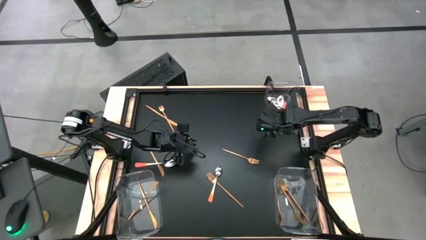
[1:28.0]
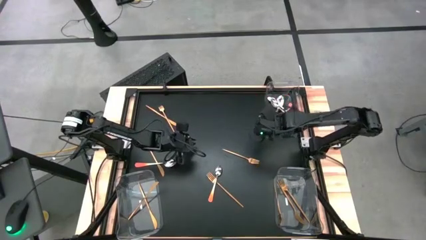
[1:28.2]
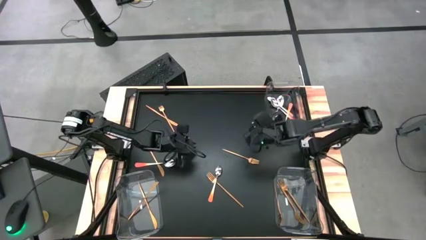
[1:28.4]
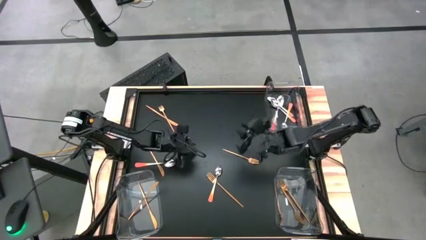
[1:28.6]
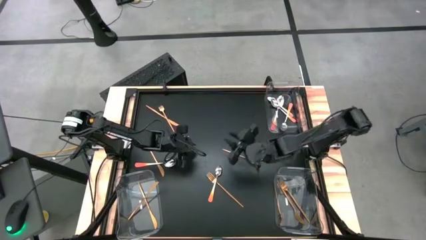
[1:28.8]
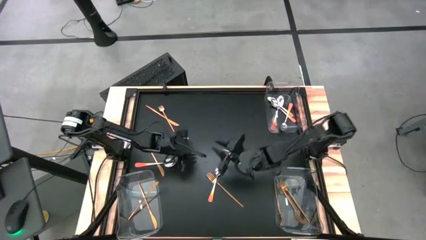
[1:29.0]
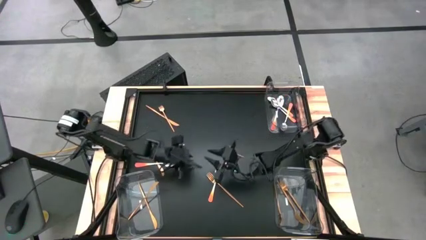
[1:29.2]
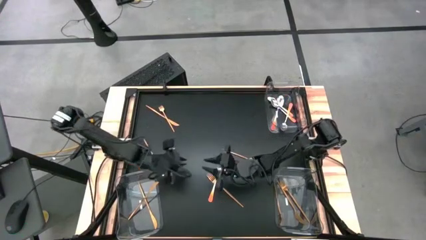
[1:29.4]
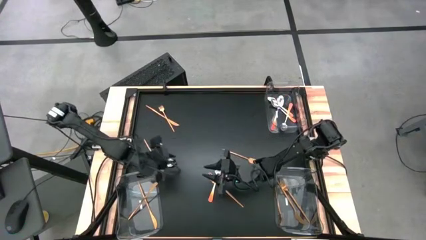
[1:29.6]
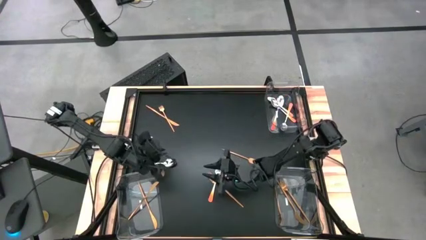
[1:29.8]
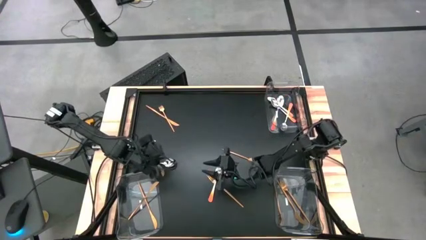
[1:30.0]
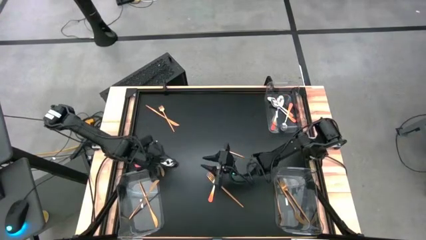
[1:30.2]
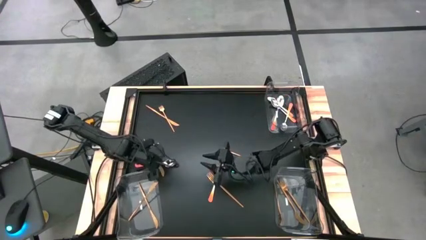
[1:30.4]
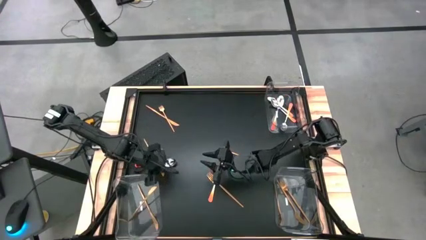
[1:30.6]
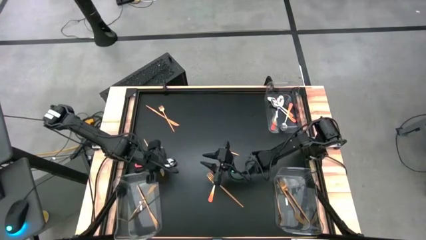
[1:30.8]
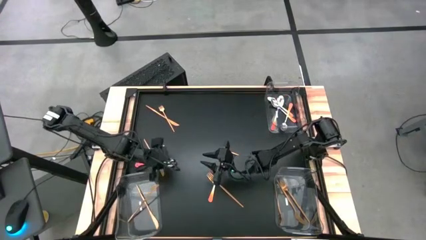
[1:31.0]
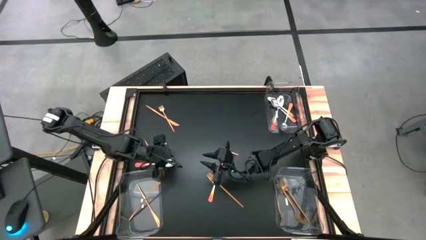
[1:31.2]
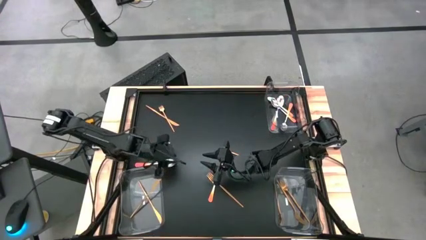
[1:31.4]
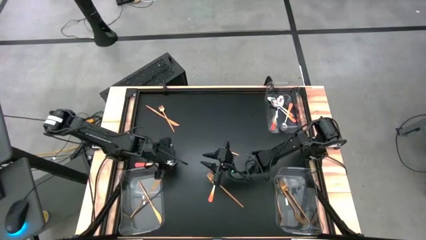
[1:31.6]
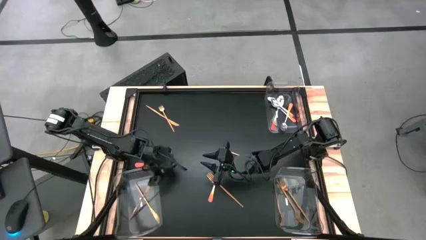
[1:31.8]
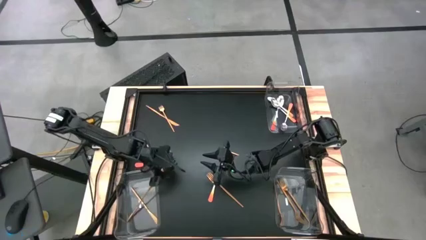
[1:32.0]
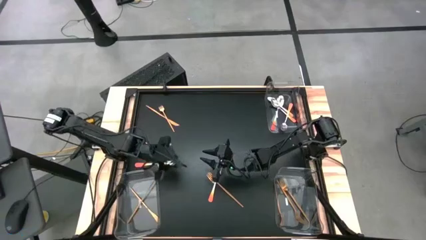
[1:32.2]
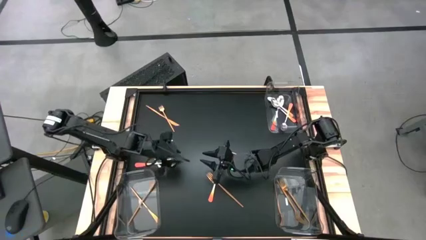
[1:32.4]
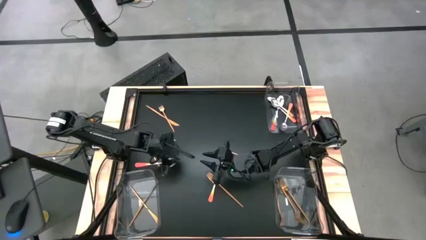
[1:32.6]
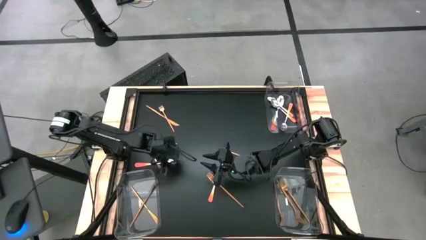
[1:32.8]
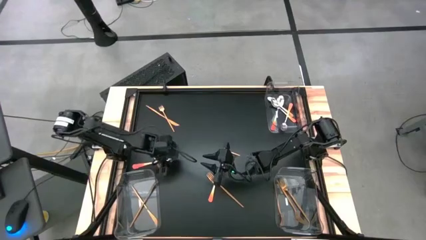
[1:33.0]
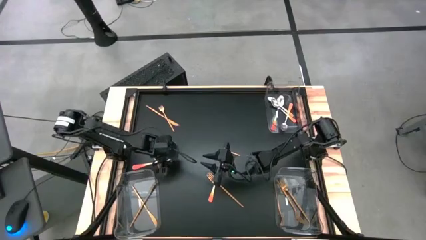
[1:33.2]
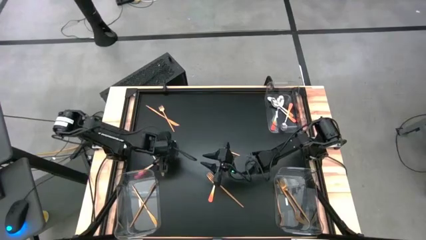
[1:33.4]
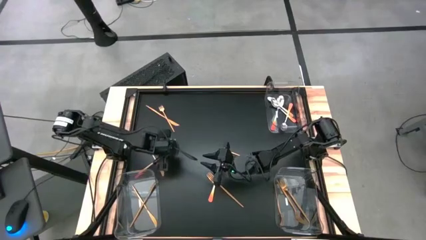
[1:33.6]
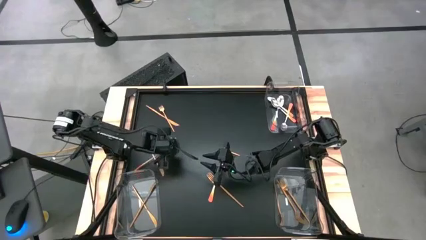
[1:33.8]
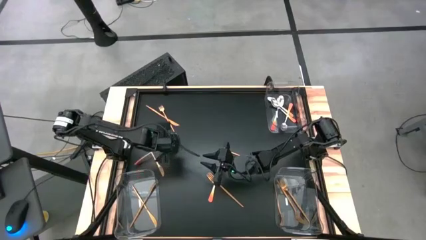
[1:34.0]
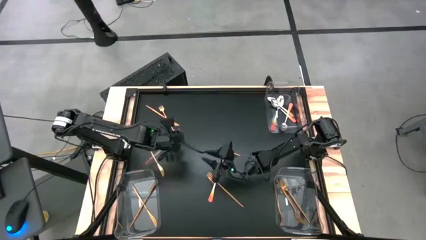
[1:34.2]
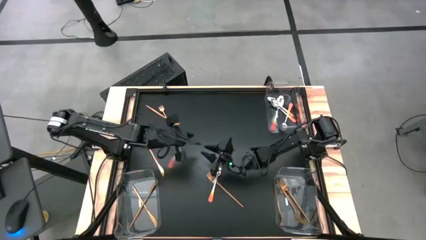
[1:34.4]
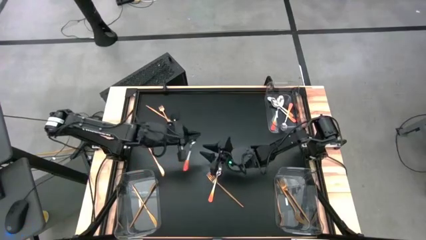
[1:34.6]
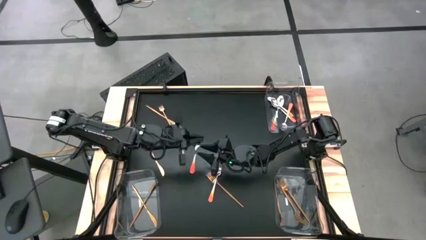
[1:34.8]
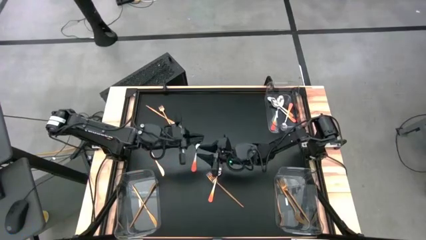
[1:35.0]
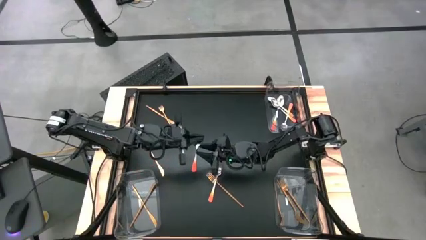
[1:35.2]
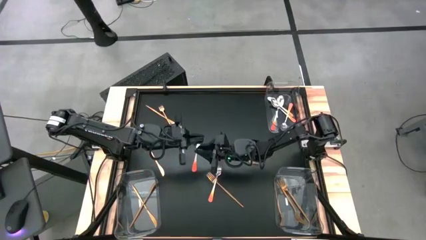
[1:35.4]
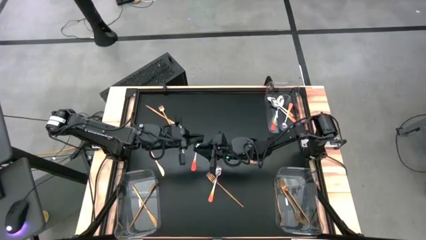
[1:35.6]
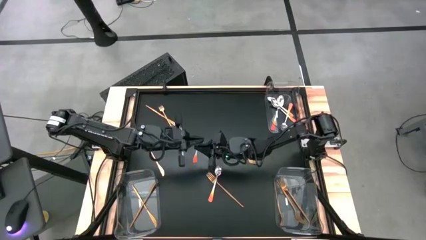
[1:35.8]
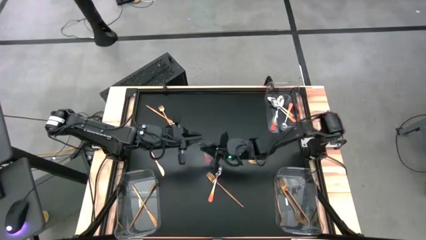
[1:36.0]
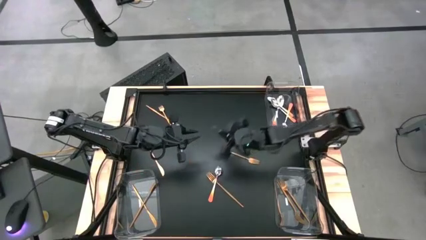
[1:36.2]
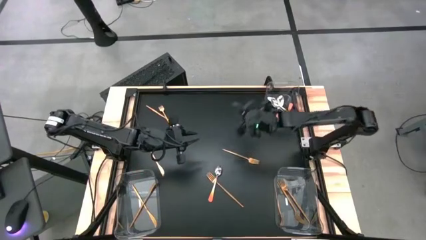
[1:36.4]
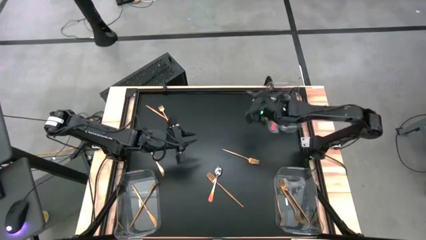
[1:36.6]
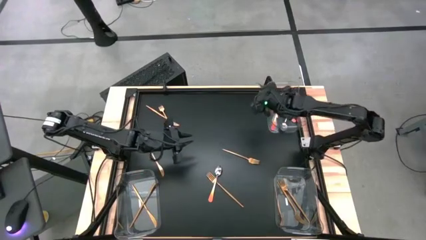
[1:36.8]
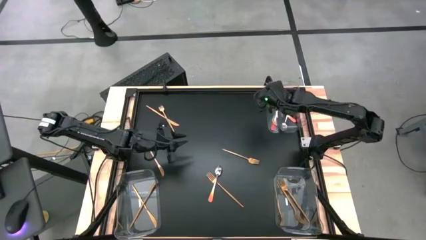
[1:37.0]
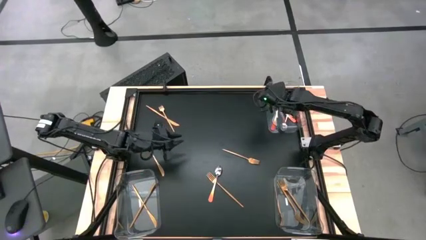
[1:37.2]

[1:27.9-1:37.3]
Task: Sort silverware by color (type)
Put the orange spoon into the top right transparent bin

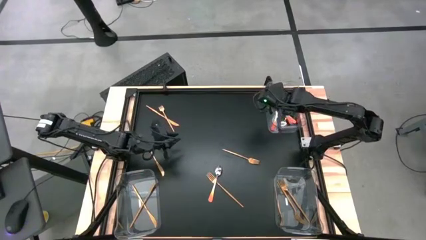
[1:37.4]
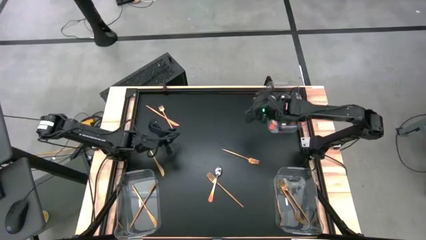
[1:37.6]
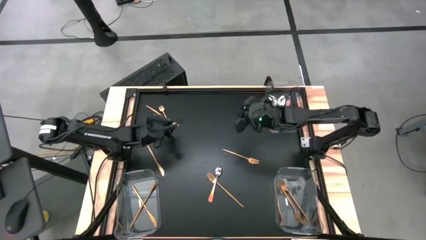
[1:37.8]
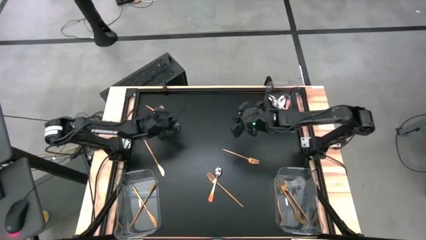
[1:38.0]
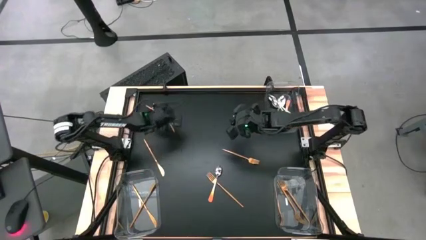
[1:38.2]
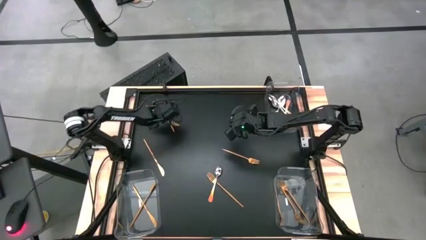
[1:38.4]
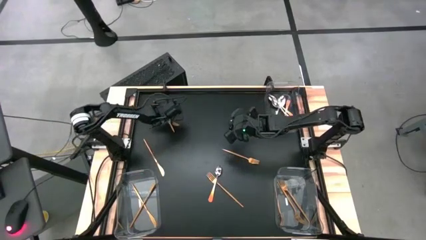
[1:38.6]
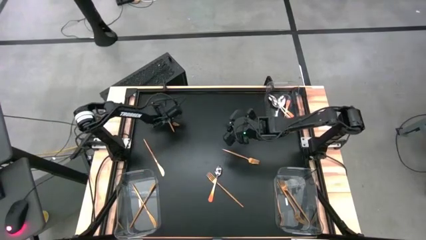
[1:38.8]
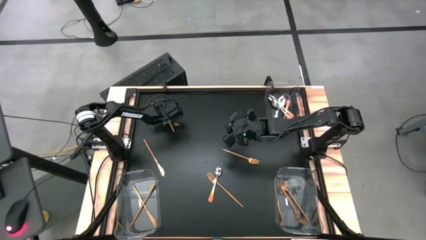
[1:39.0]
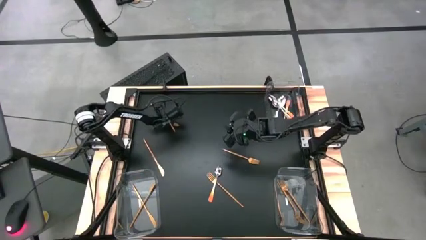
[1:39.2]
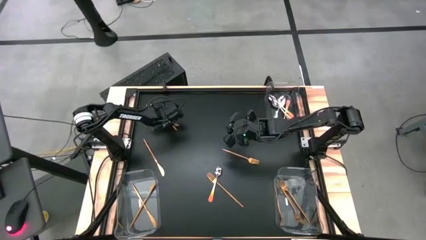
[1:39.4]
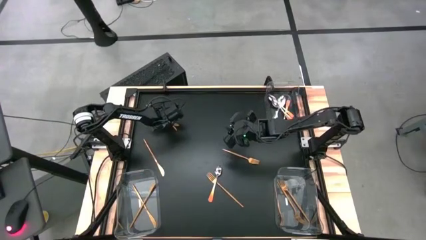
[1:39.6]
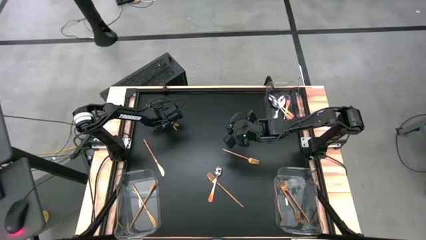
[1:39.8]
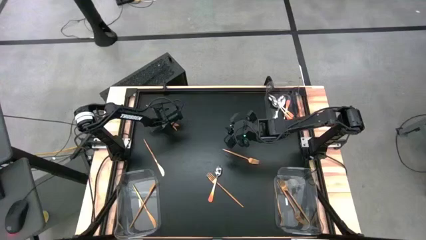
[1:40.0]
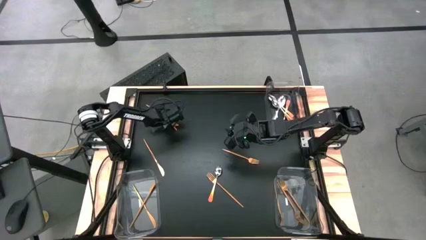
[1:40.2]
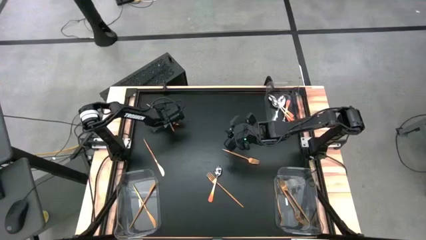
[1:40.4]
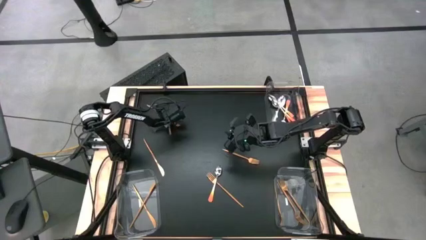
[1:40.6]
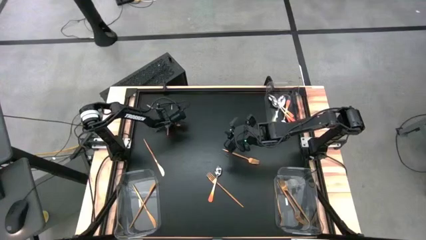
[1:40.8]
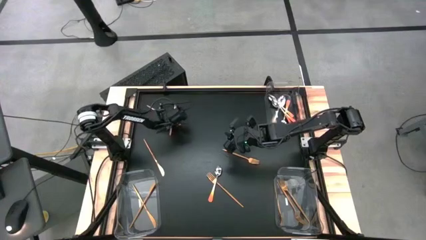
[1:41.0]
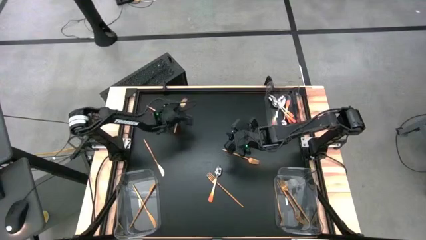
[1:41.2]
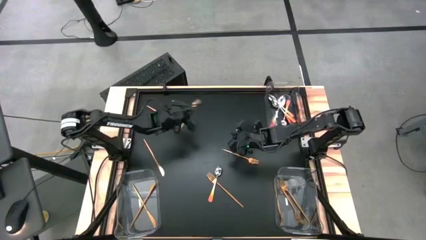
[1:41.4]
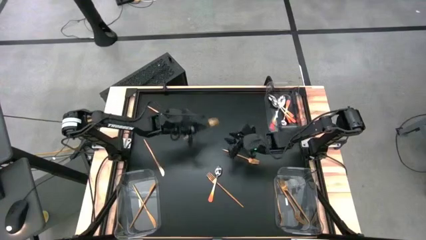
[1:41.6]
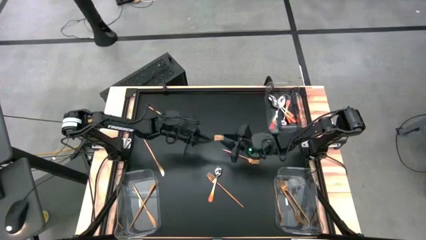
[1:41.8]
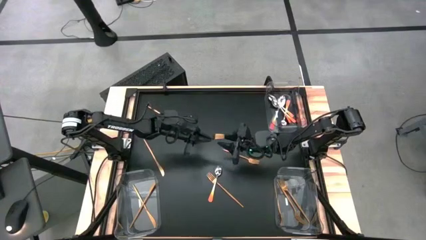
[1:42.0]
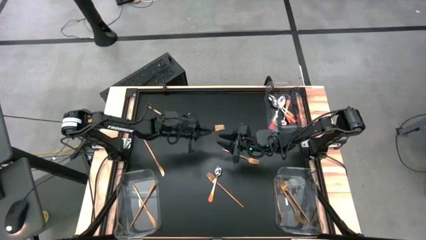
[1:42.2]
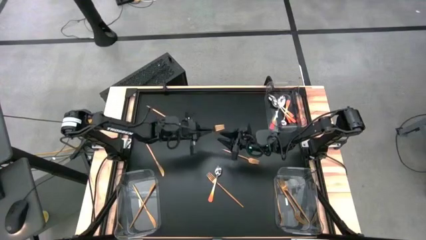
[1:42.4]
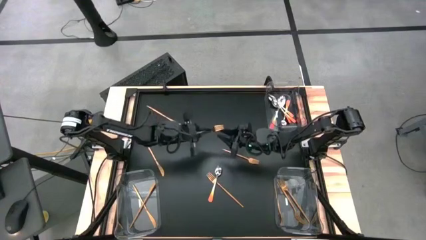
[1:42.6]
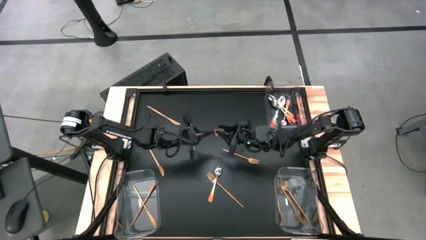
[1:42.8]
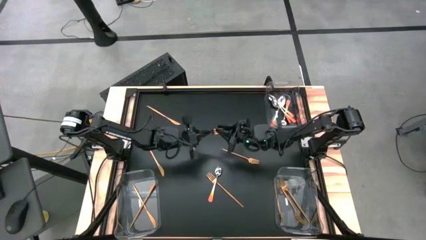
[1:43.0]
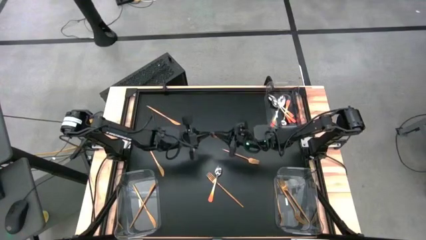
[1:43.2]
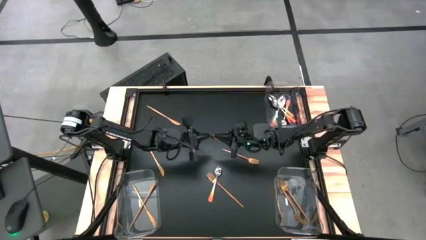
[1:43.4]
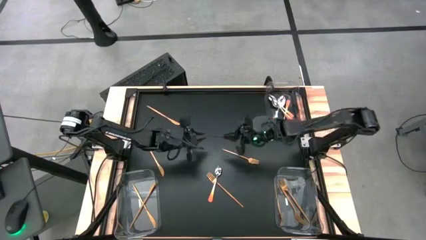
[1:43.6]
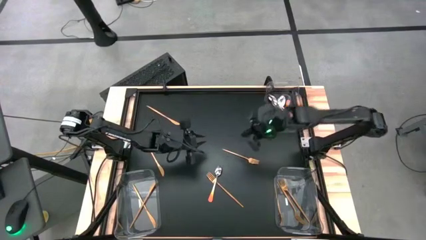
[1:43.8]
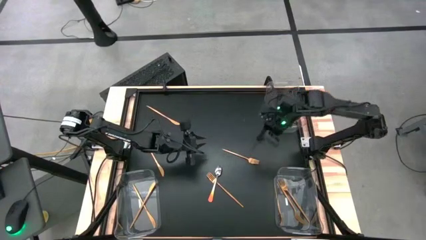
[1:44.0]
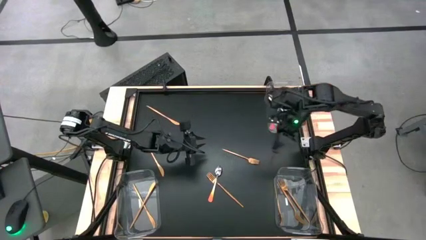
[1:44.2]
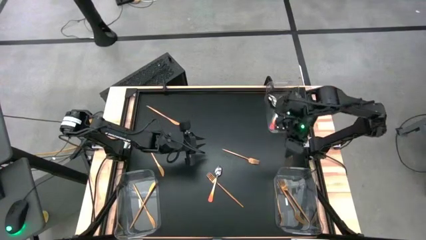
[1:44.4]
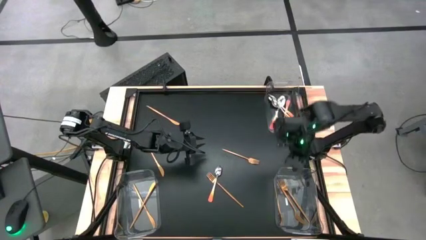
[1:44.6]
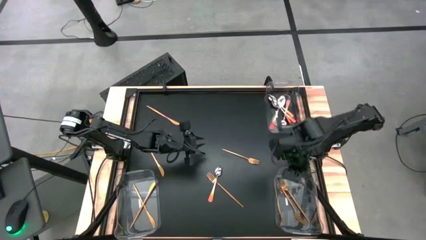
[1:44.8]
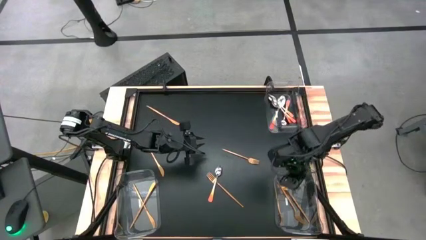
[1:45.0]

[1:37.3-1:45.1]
Put the gold fork into the bottom right transparent bin
